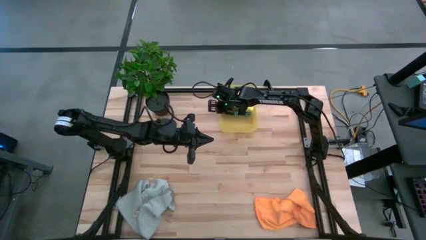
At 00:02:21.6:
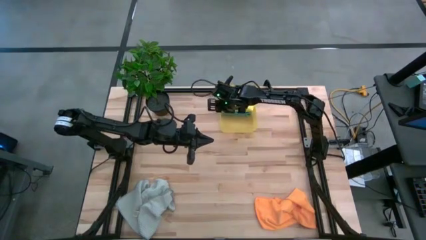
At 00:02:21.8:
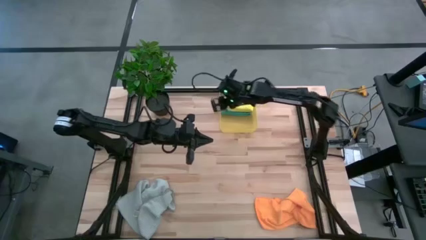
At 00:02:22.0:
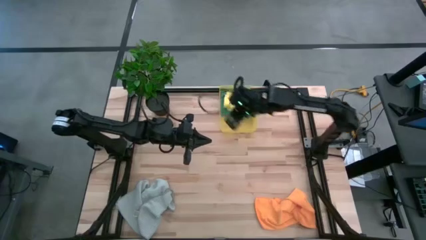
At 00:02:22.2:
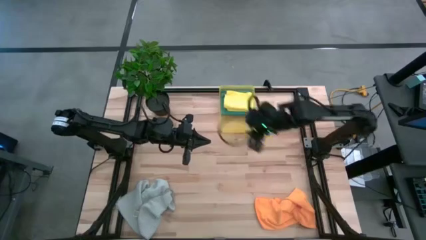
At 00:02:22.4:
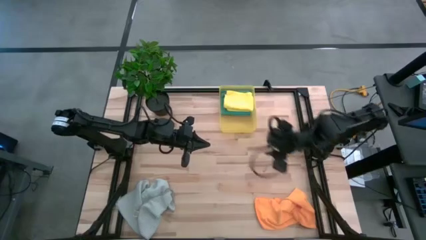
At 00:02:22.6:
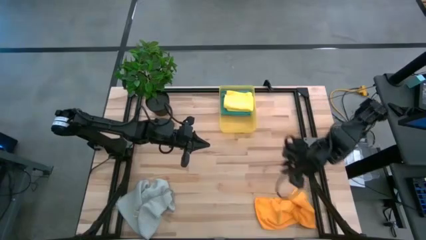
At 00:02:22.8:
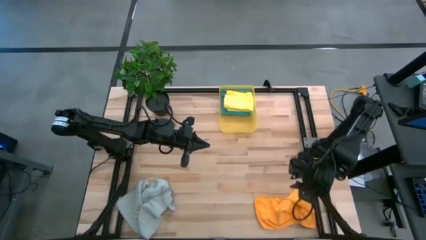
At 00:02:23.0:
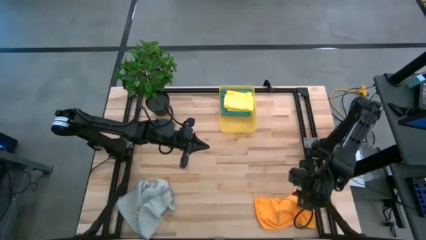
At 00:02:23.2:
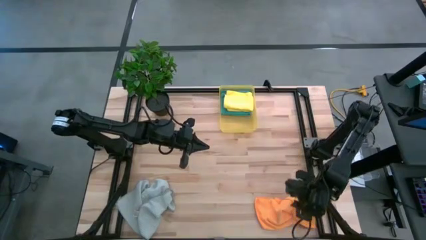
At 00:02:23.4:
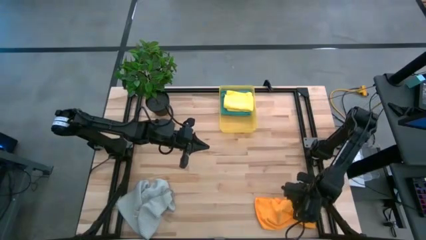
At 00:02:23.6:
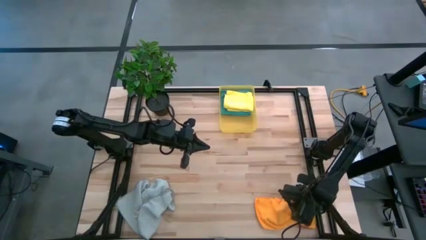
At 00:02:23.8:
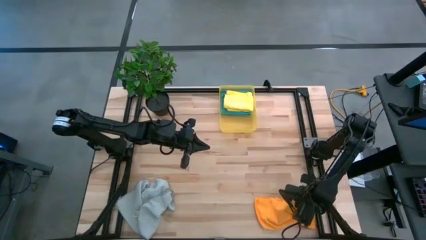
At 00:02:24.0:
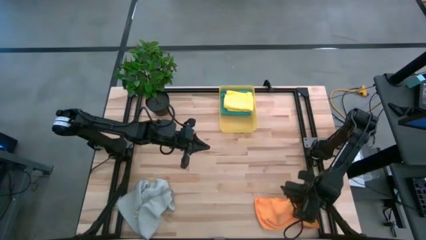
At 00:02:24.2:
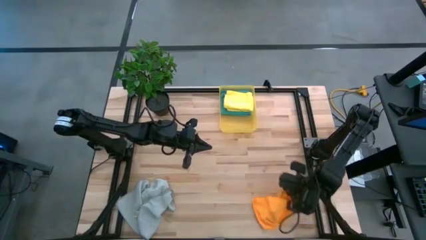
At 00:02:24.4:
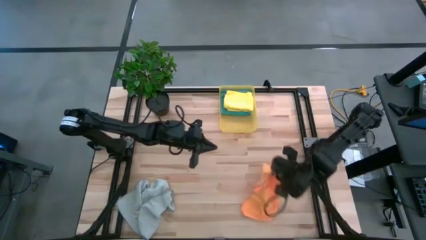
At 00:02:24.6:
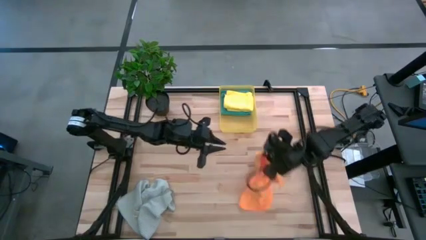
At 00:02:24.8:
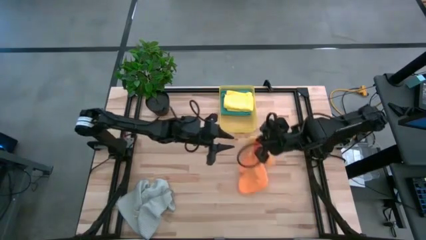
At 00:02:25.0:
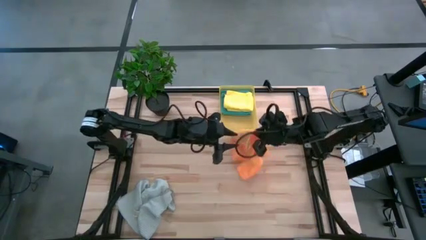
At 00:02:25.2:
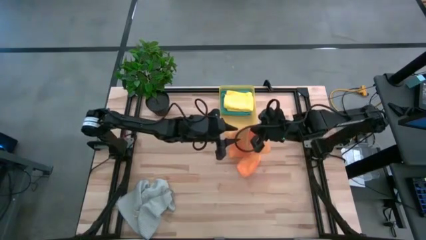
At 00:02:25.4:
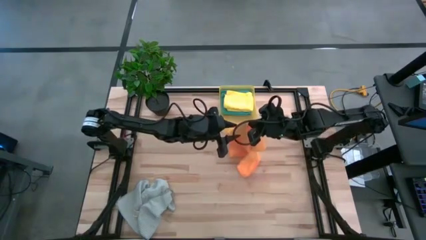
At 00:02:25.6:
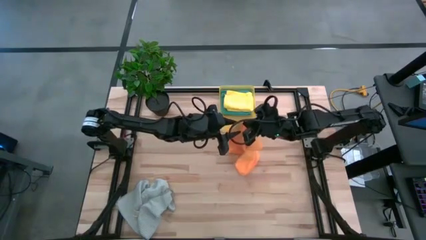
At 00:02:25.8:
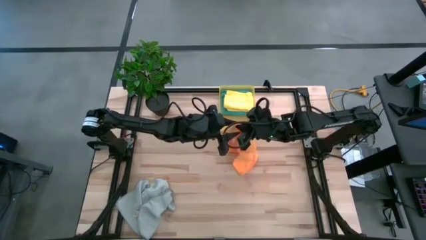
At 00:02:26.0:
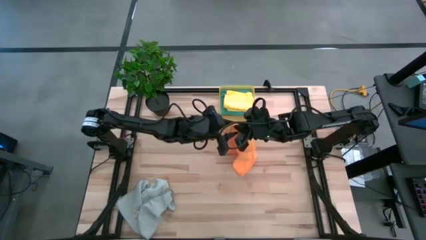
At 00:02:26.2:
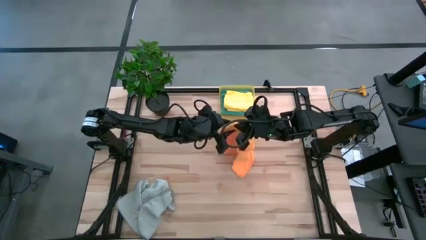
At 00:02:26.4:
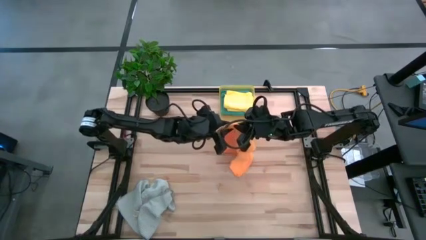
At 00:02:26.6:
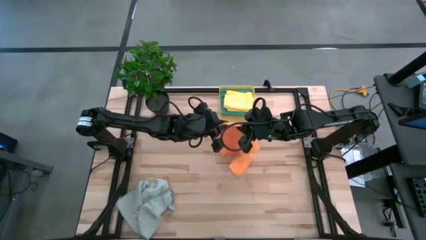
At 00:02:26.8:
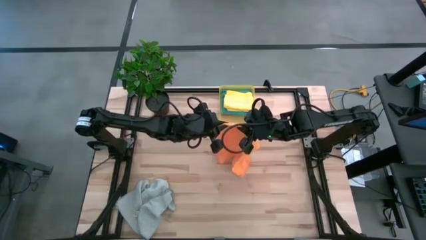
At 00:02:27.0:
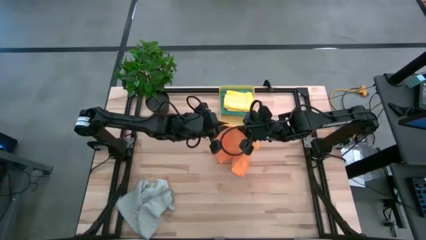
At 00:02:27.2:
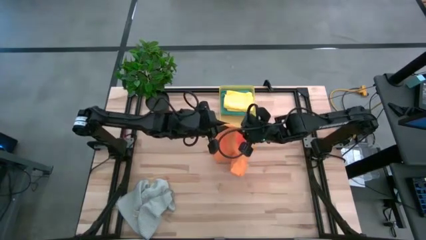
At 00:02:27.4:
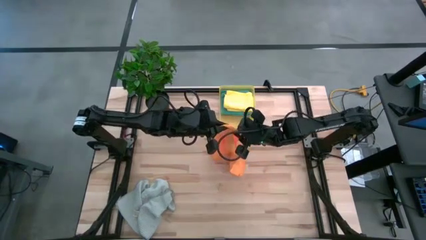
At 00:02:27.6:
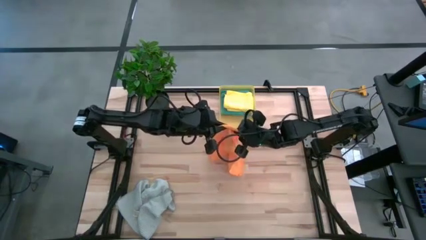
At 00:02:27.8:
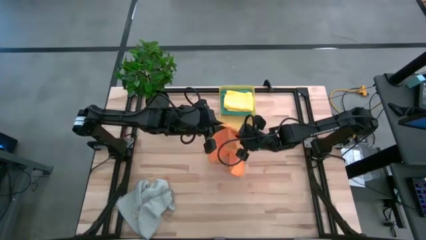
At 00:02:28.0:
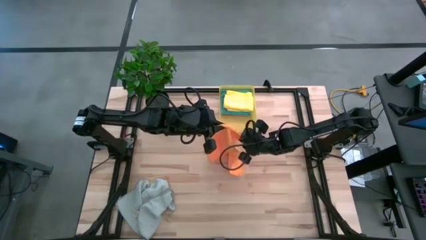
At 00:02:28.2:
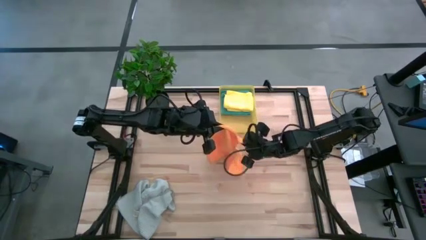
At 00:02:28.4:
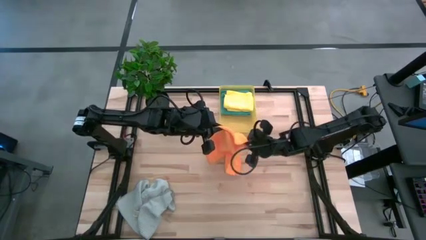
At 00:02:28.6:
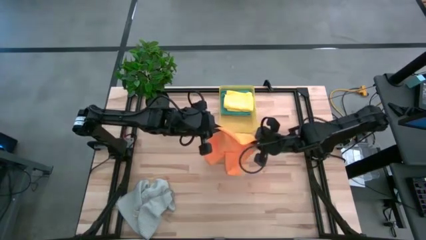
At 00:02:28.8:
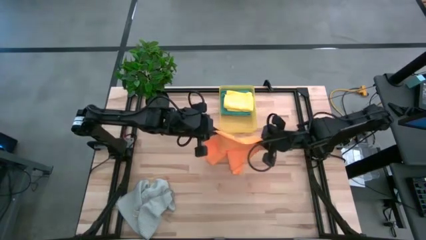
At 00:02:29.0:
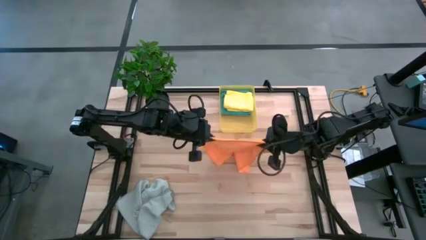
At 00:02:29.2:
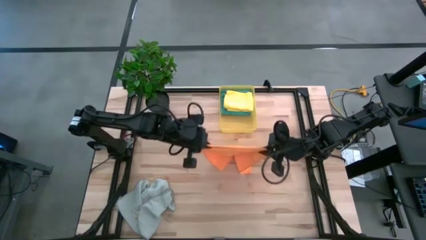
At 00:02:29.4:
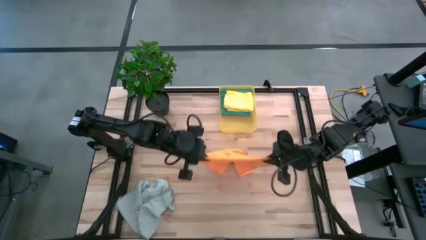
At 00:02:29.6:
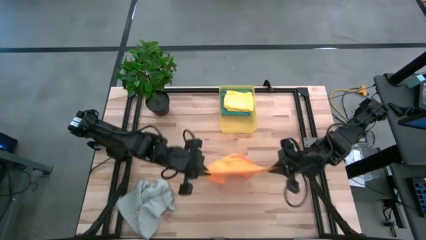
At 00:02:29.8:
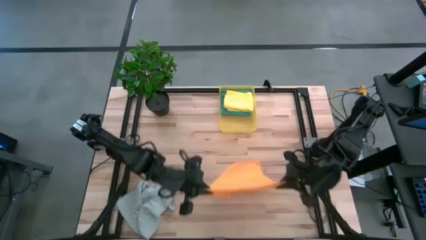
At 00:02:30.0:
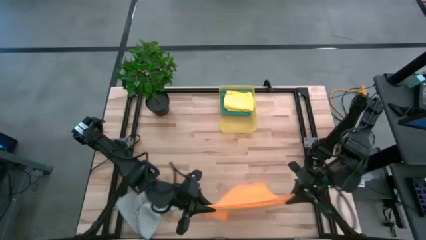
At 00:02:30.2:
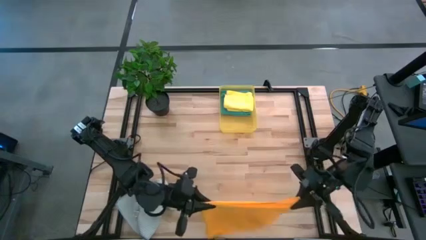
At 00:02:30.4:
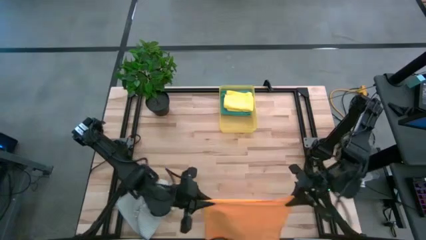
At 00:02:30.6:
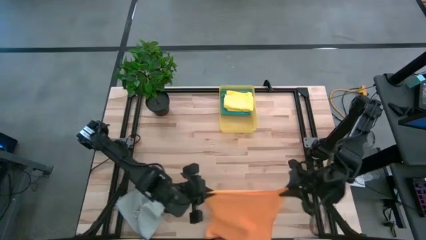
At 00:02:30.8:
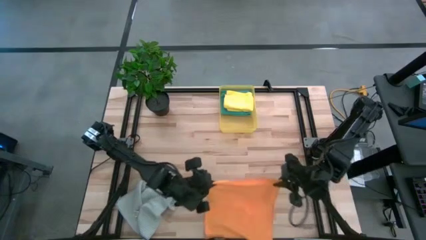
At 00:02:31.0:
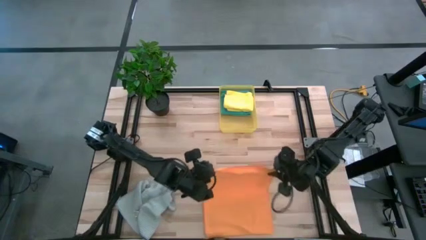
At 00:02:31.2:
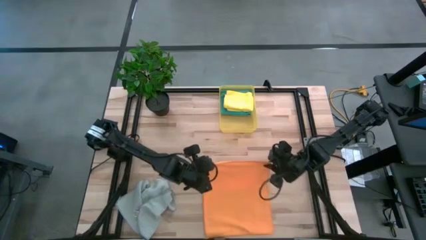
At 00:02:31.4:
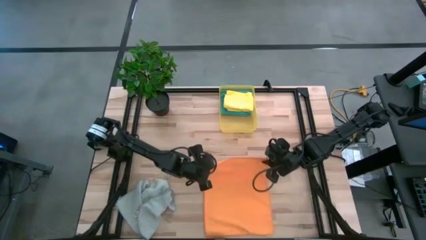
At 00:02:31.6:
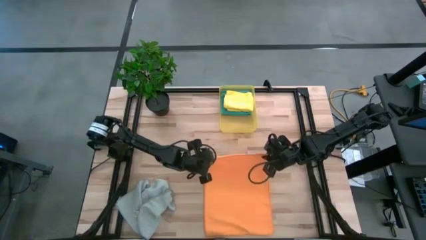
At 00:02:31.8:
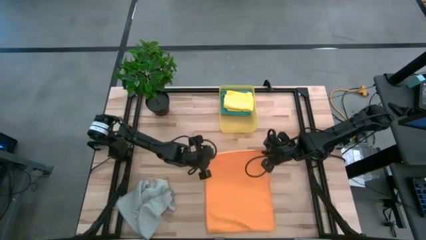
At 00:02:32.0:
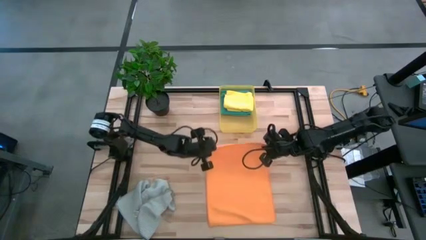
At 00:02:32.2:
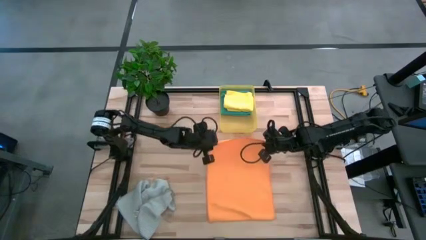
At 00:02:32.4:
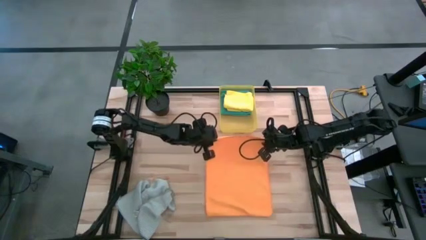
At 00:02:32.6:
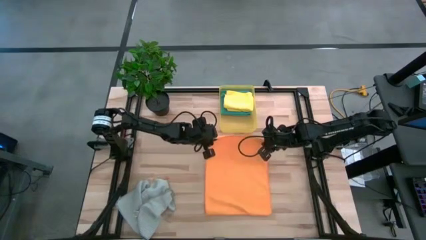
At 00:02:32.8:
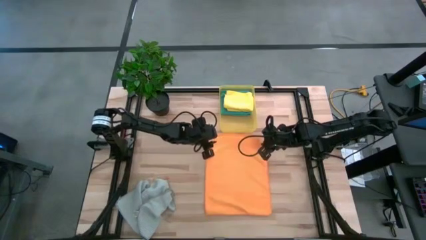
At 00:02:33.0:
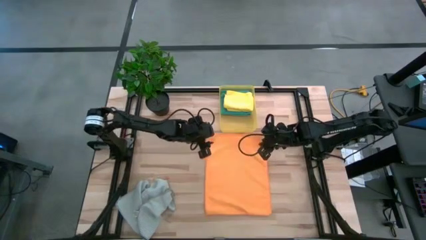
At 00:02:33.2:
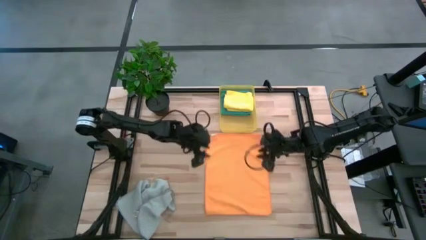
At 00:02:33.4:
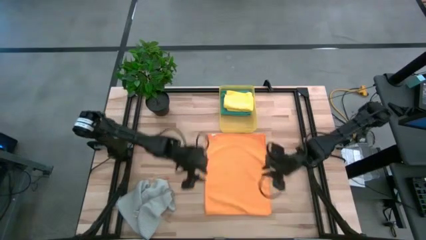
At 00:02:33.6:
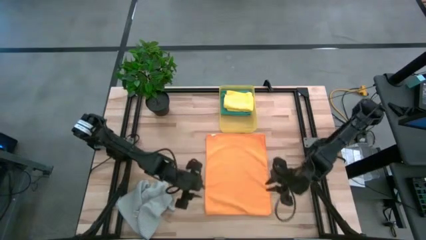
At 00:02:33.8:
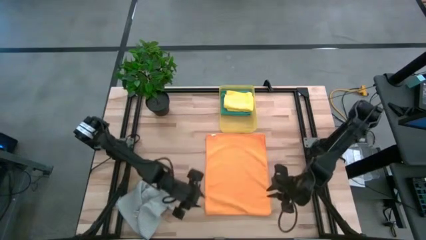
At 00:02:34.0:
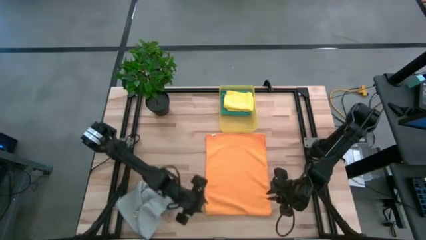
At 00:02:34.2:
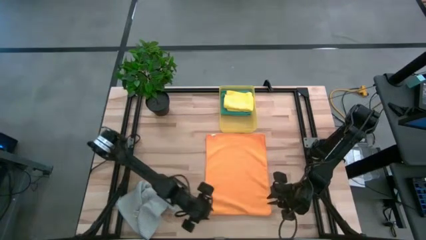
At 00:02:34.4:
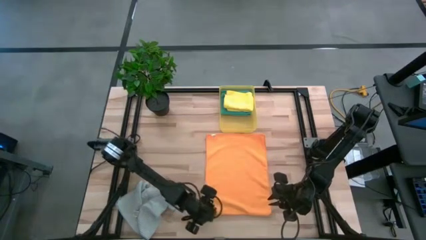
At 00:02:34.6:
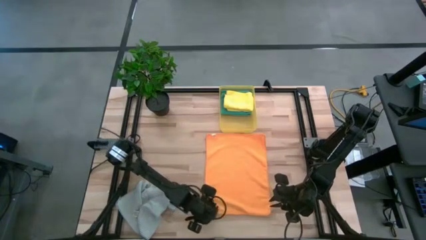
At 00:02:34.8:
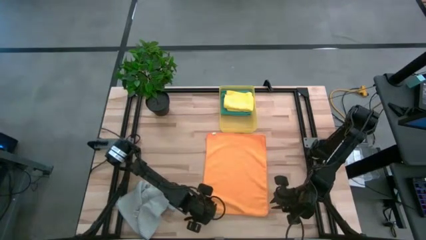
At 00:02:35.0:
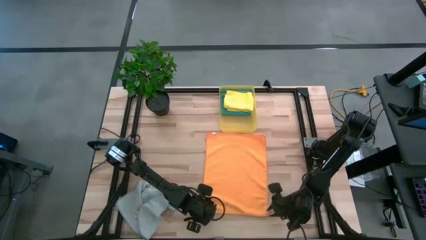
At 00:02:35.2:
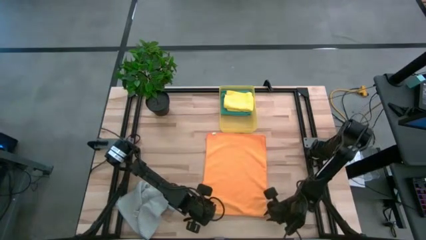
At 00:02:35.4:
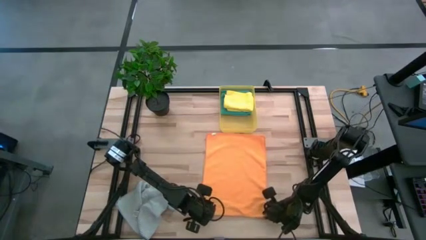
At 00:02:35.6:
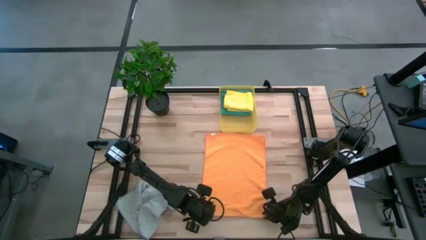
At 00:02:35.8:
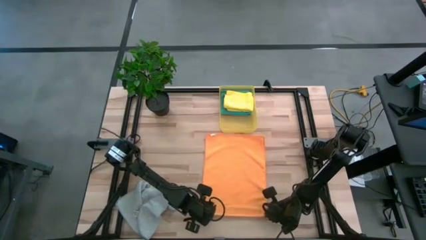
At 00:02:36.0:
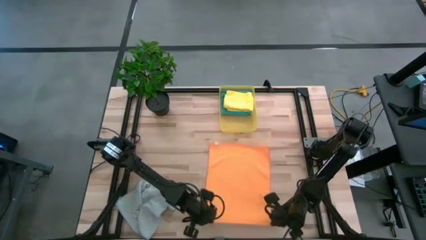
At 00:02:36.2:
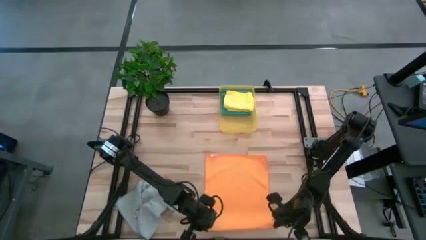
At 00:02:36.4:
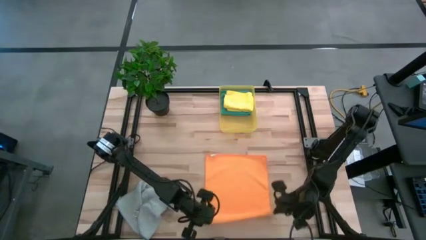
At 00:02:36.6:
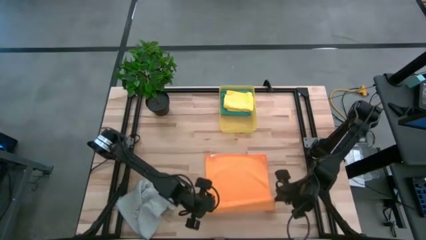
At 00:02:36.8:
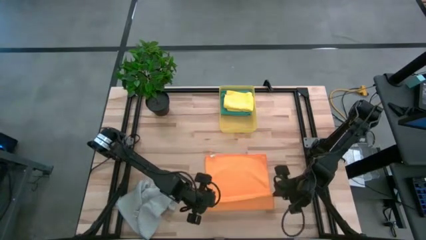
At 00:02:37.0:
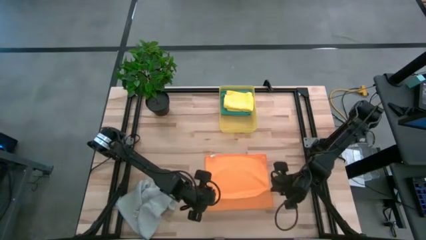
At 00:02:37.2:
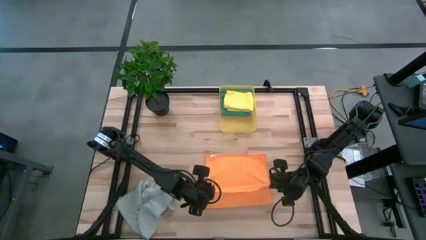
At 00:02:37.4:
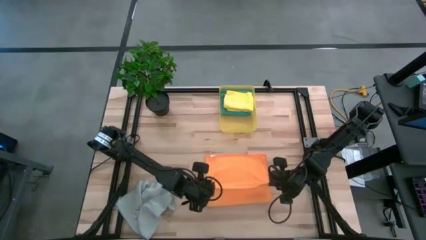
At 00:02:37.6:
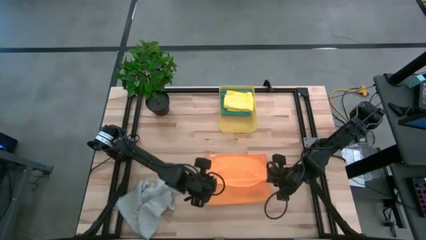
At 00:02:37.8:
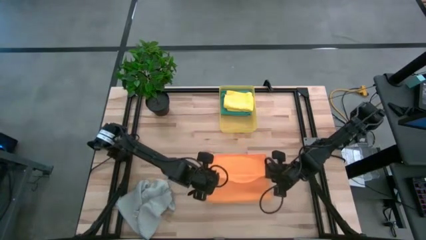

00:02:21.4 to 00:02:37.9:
Task: Fold microfiber towels
Fold the orange microfiber towel
